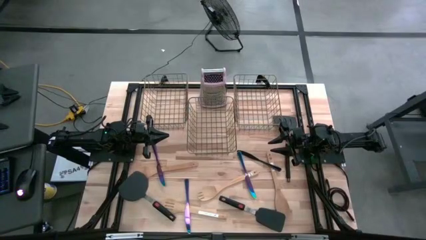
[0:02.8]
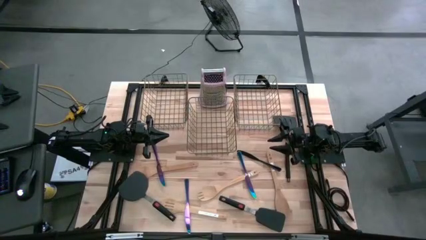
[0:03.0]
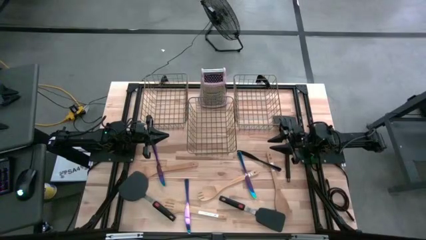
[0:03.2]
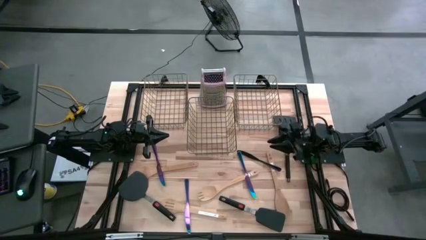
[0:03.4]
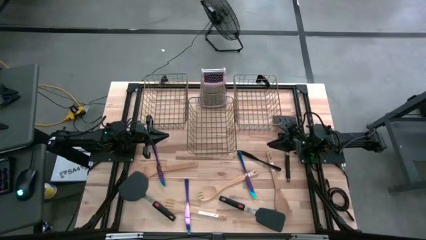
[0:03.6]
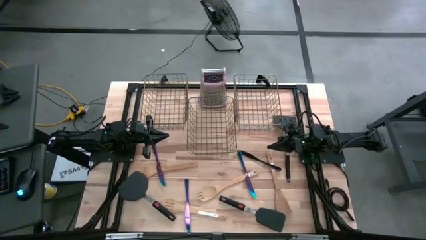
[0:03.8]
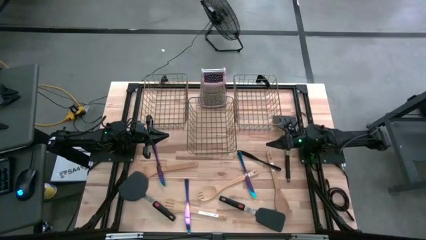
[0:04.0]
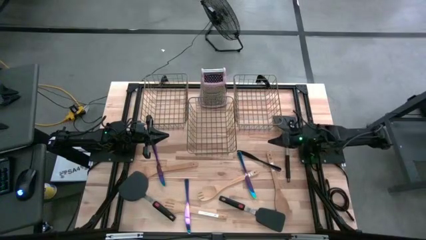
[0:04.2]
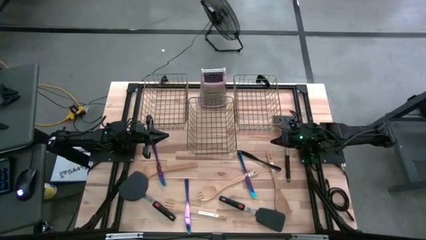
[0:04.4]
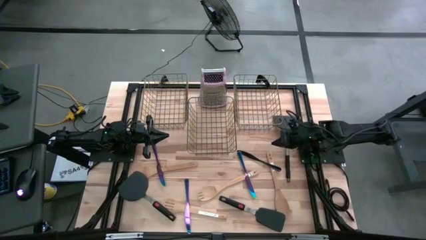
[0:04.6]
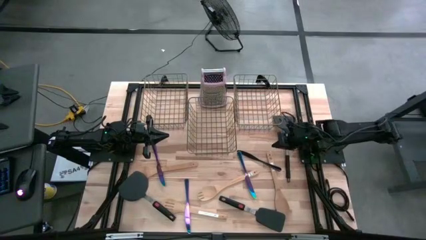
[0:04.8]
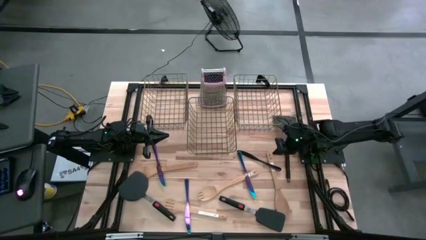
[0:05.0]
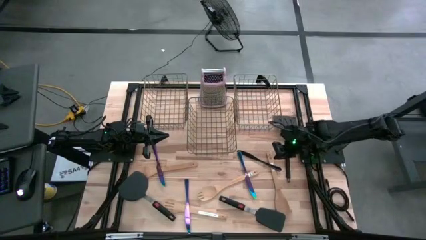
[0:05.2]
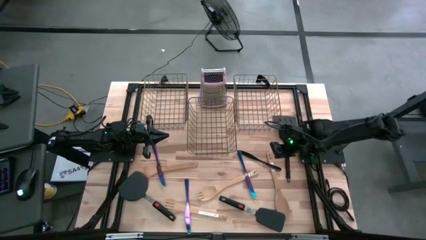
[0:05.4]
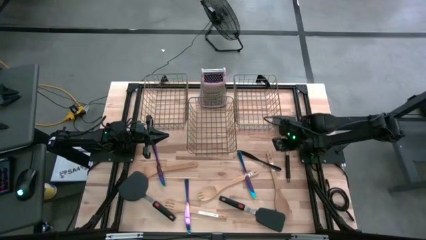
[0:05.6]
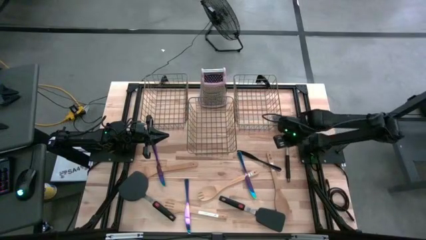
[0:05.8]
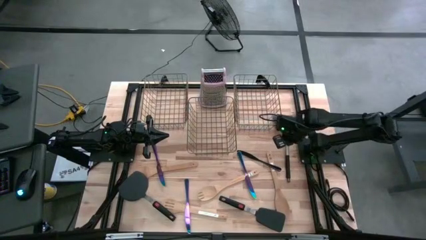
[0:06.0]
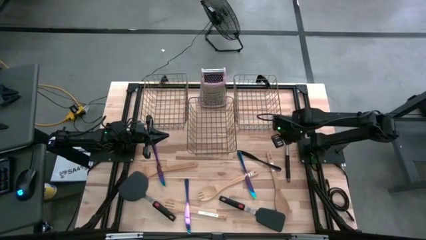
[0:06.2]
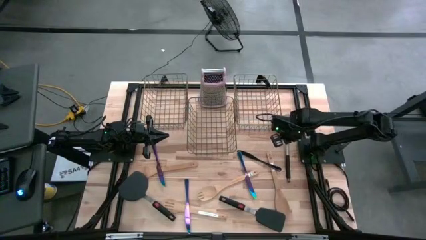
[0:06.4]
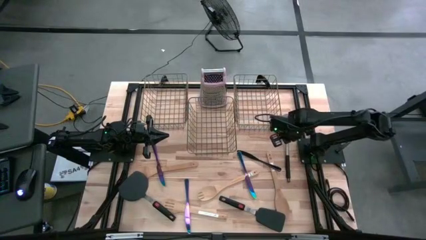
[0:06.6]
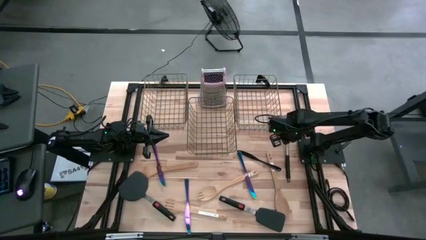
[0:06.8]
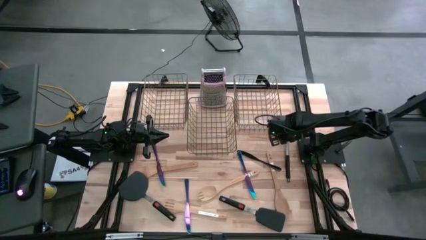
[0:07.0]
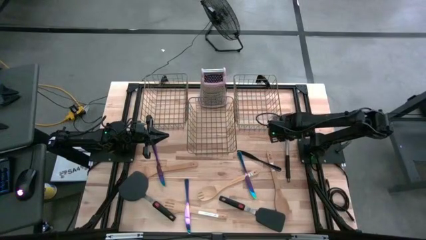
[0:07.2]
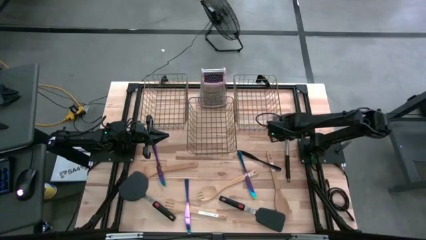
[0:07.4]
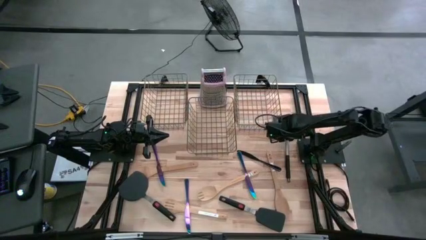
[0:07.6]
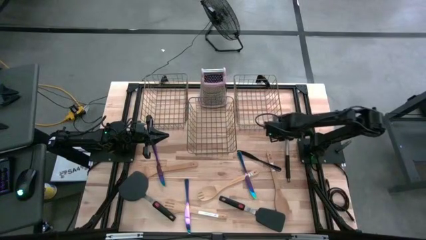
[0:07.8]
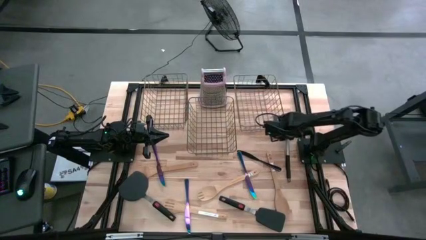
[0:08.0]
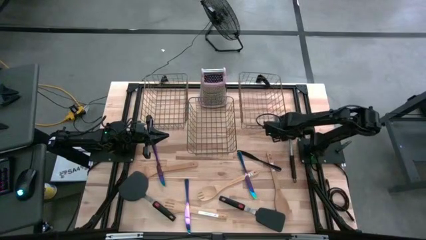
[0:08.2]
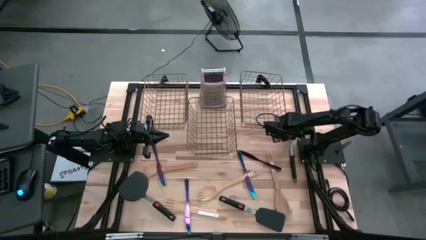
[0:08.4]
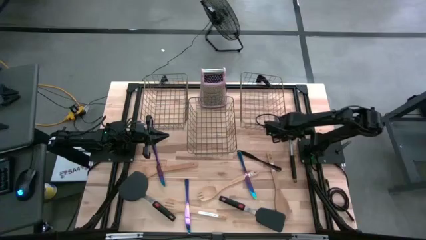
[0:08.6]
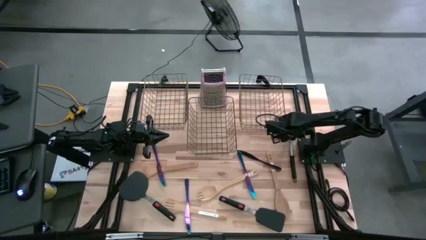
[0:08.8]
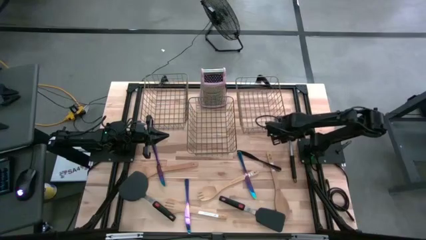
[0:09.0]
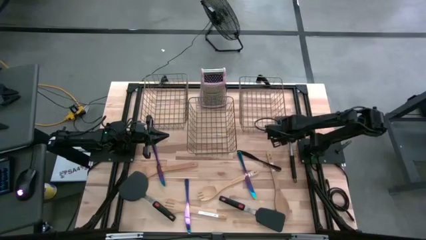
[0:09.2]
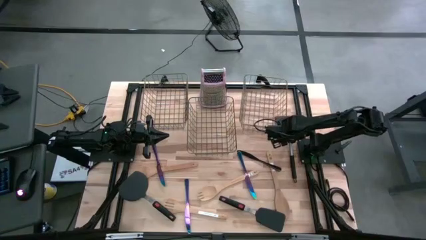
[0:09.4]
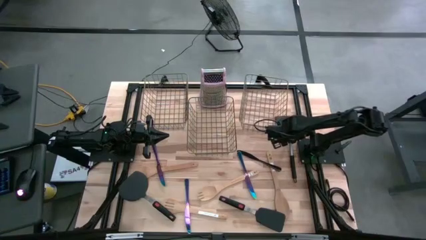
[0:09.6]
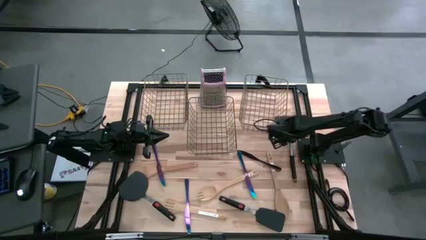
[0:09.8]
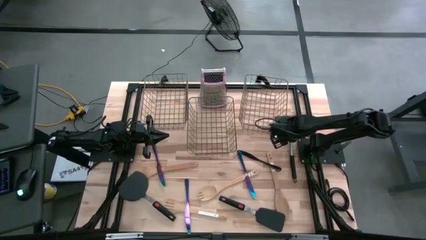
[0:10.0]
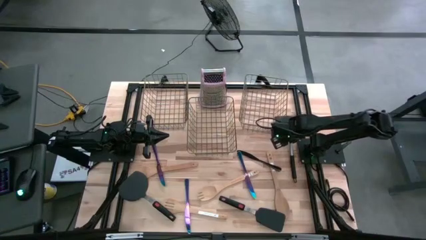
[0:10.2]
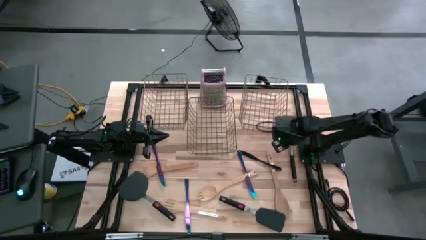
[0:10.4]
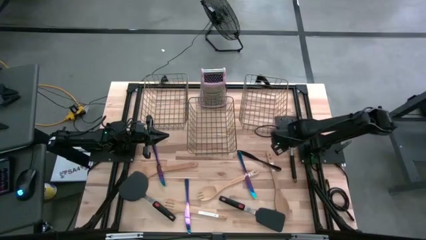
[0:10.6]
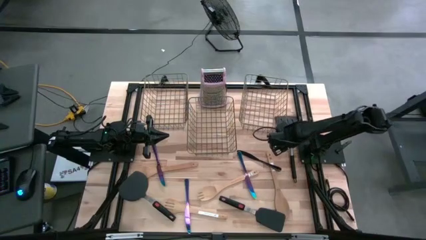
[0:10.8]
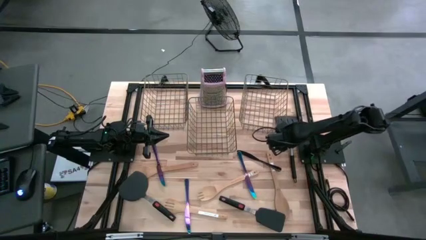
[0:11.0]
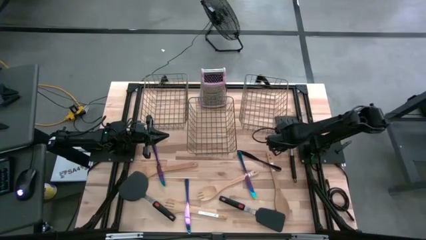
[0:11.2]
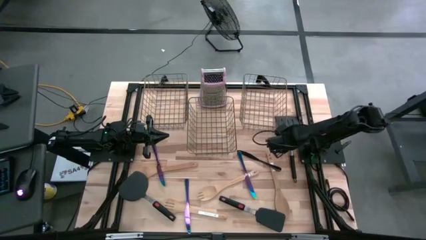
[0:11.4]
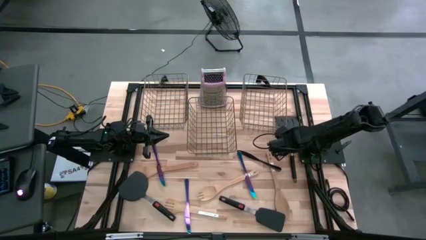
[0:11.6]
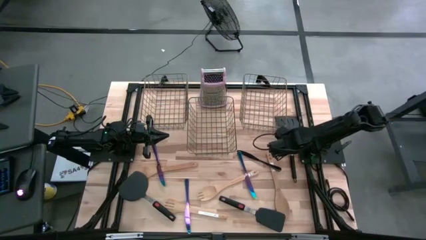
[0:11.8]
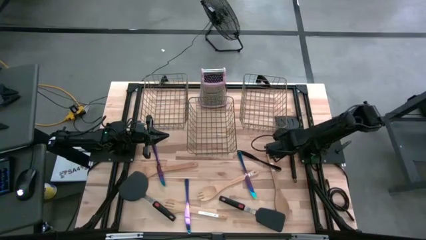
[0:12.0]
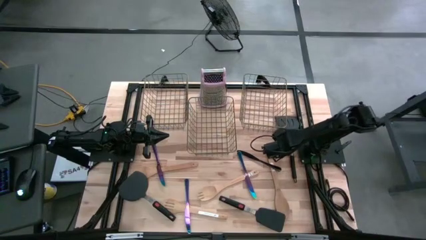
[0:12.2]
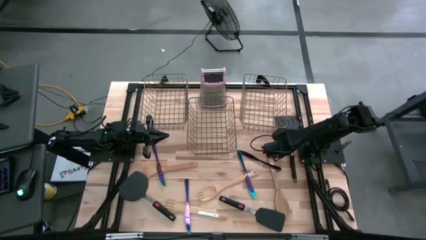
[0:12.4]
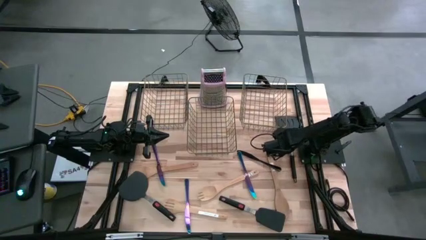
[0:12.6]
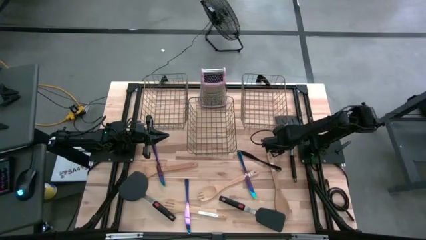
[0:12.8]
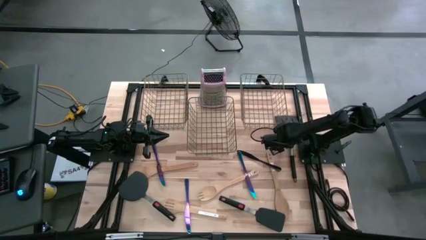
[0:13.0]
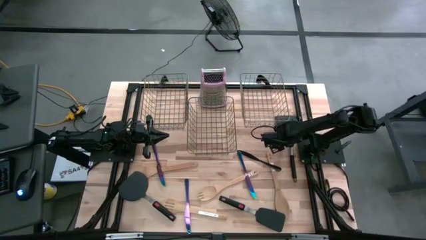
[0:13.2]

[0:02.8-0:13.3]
Task: Pick & Place Kitchen Items
Put the top black spatula into the right wire basket
